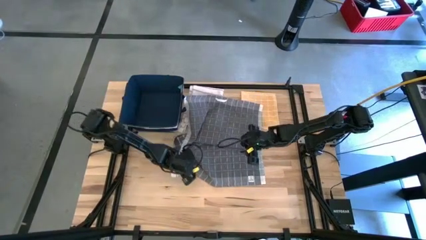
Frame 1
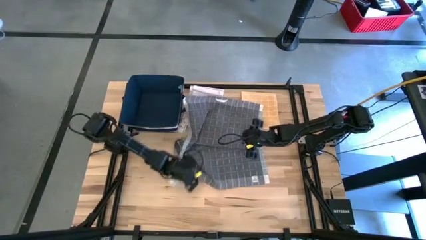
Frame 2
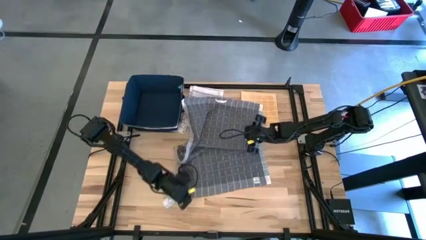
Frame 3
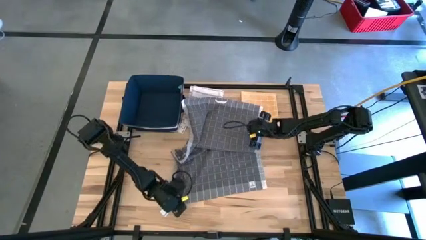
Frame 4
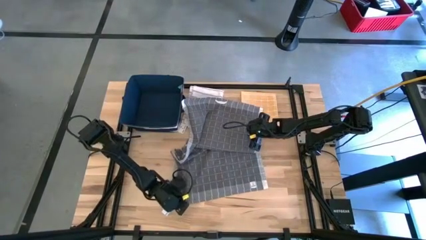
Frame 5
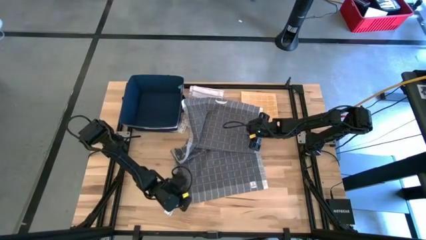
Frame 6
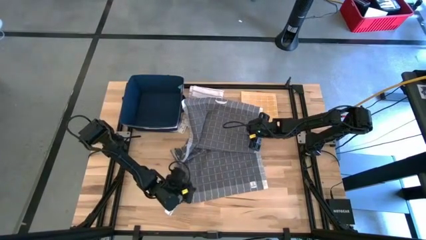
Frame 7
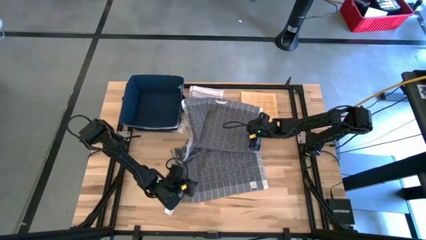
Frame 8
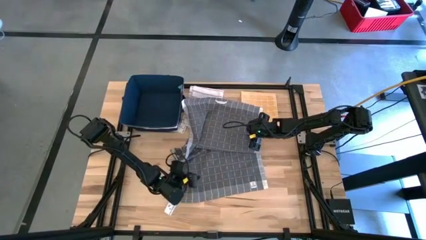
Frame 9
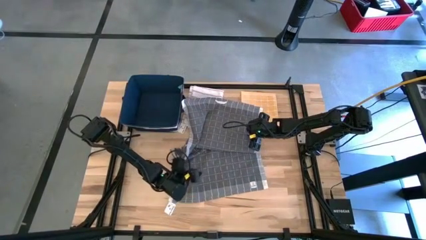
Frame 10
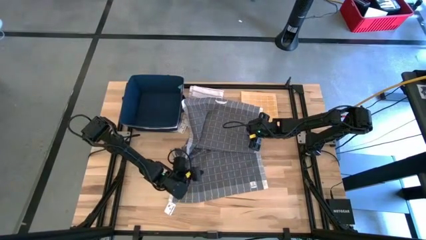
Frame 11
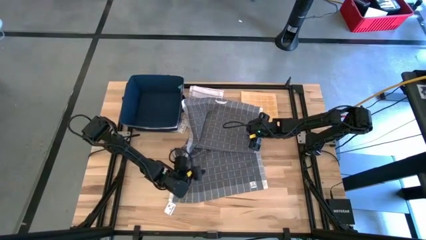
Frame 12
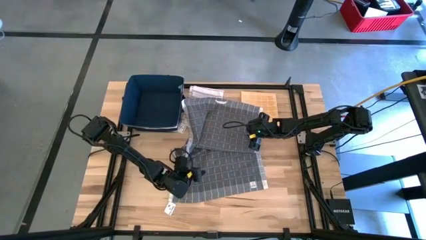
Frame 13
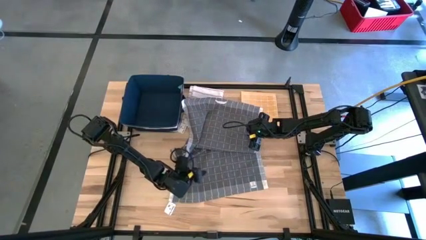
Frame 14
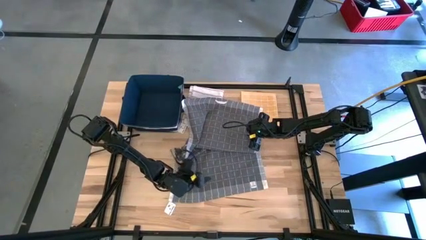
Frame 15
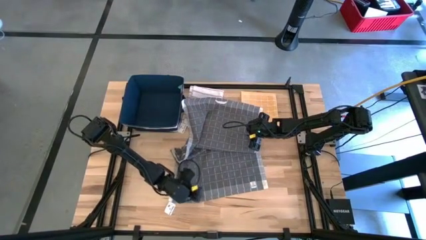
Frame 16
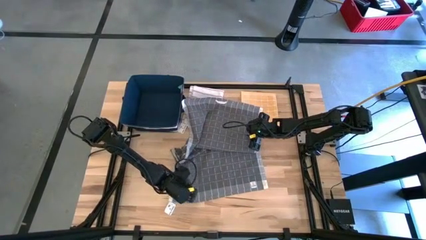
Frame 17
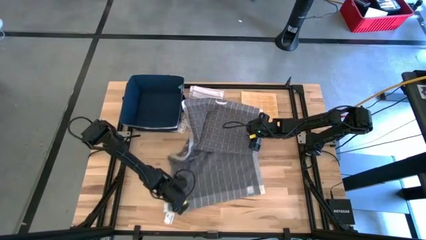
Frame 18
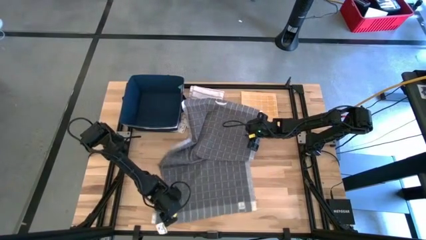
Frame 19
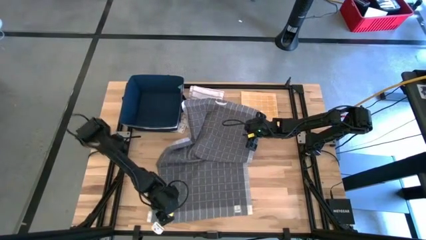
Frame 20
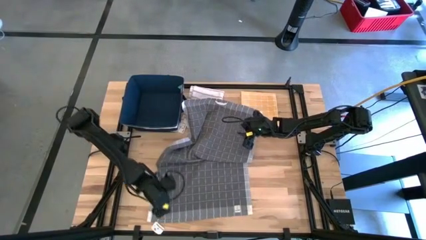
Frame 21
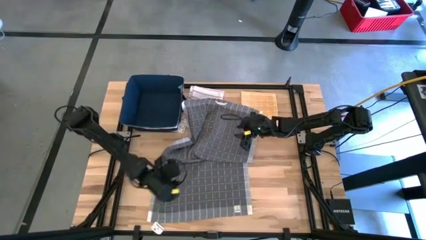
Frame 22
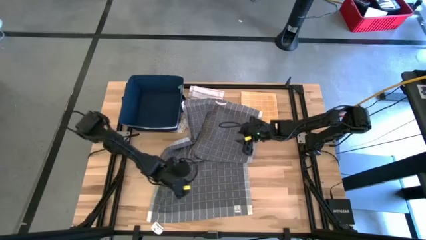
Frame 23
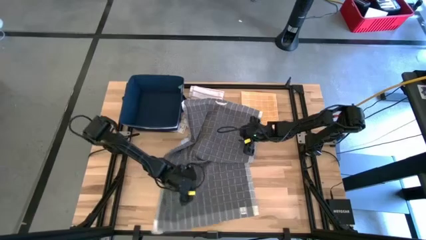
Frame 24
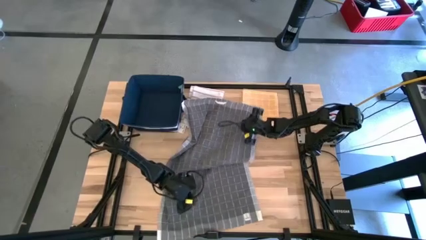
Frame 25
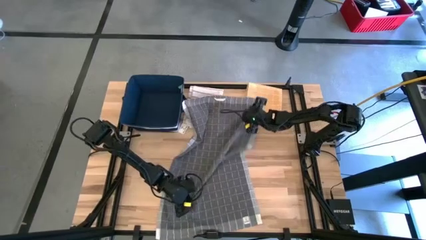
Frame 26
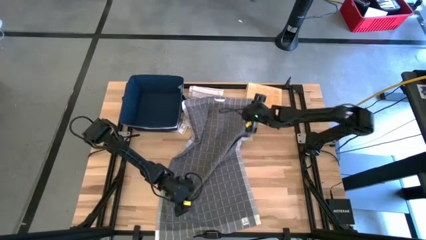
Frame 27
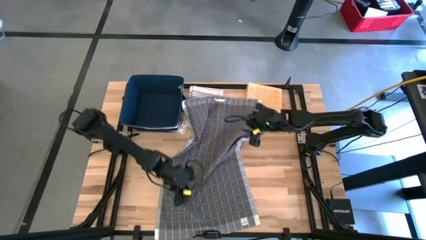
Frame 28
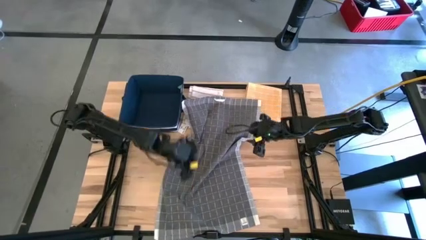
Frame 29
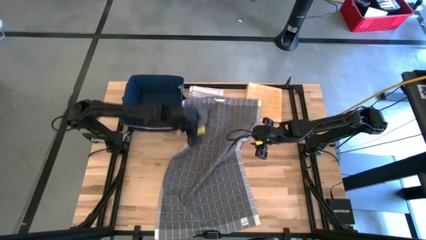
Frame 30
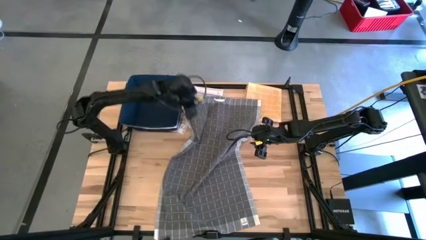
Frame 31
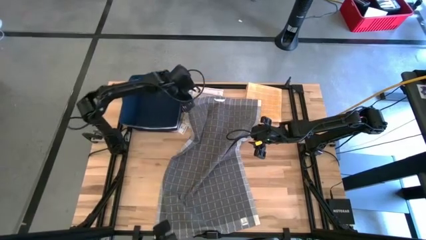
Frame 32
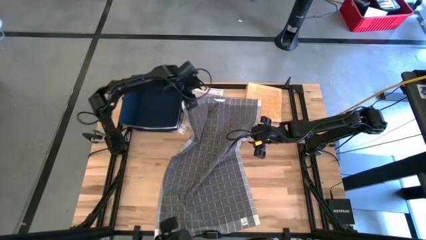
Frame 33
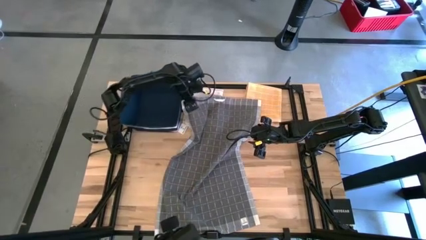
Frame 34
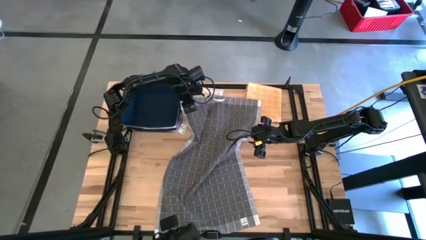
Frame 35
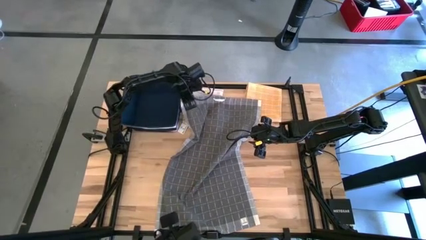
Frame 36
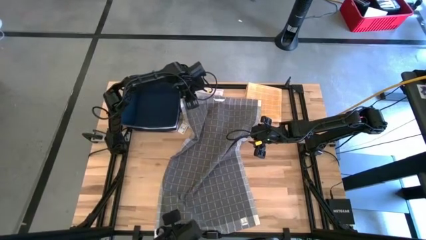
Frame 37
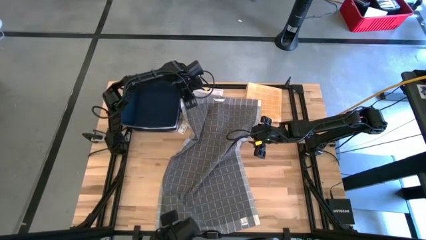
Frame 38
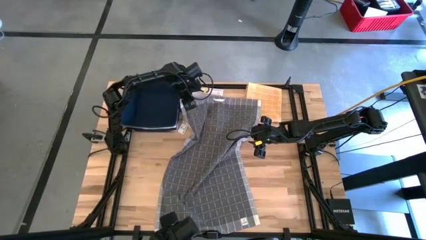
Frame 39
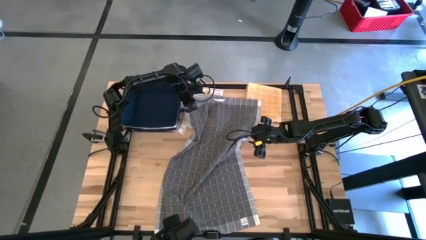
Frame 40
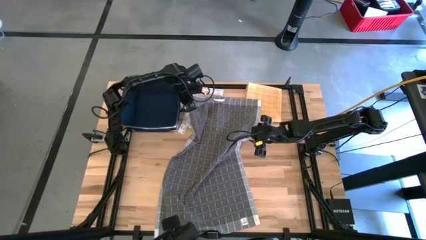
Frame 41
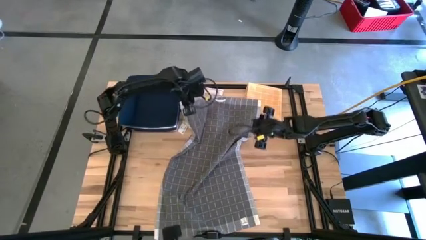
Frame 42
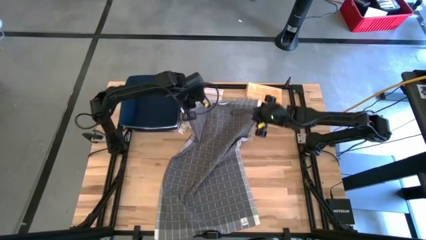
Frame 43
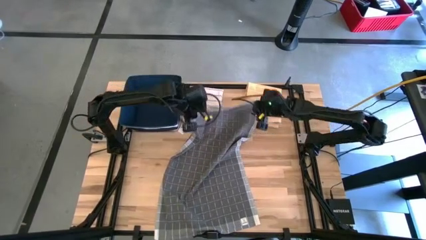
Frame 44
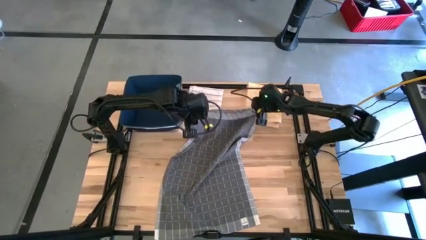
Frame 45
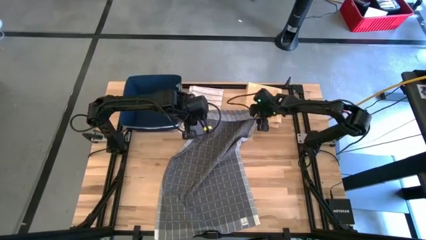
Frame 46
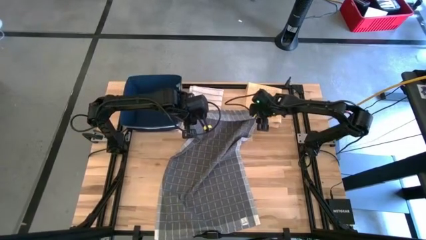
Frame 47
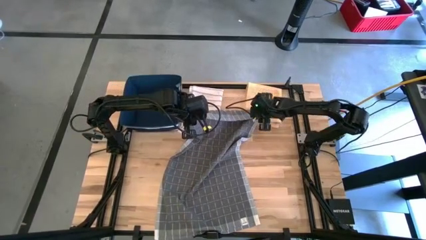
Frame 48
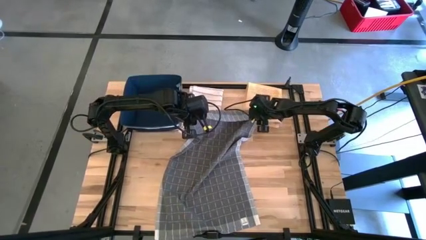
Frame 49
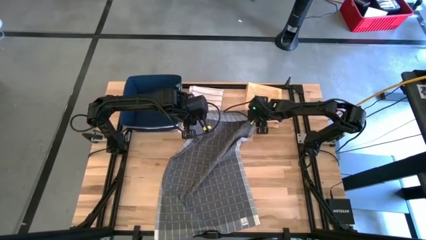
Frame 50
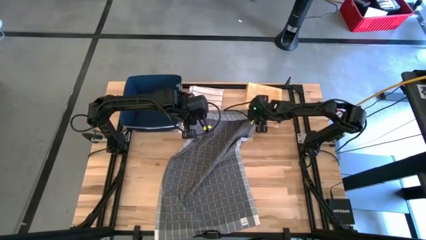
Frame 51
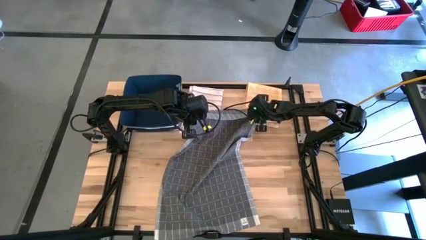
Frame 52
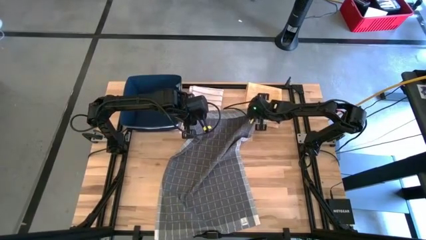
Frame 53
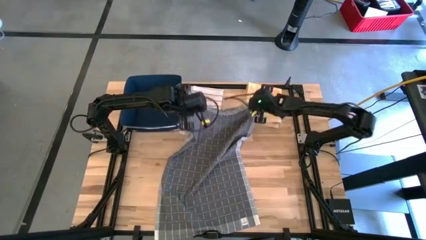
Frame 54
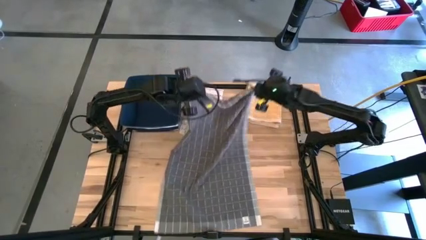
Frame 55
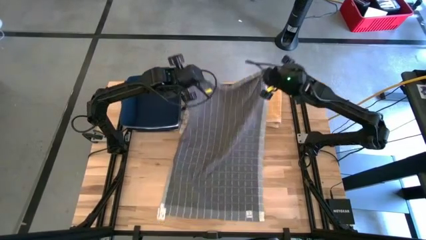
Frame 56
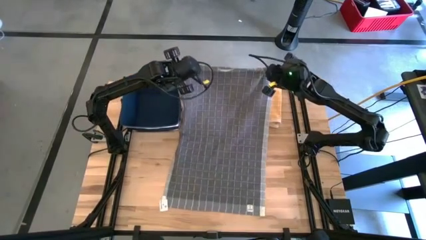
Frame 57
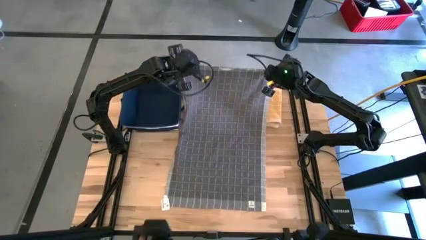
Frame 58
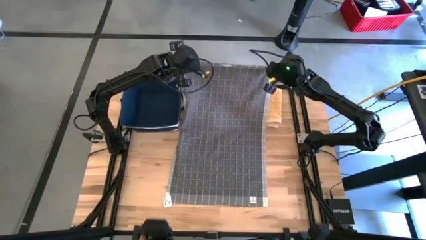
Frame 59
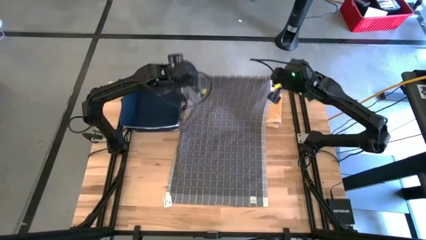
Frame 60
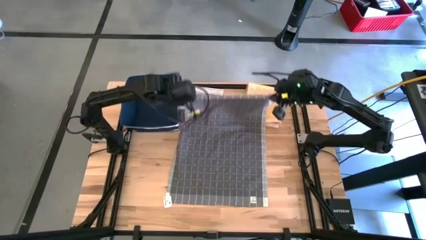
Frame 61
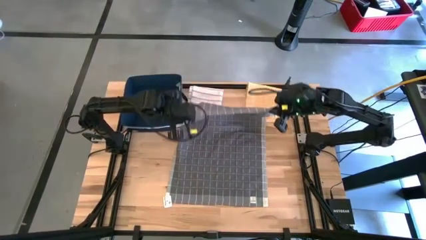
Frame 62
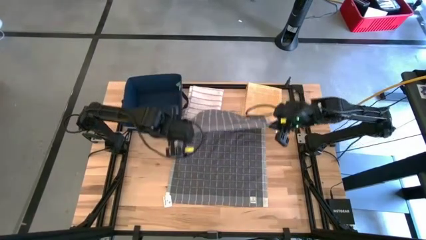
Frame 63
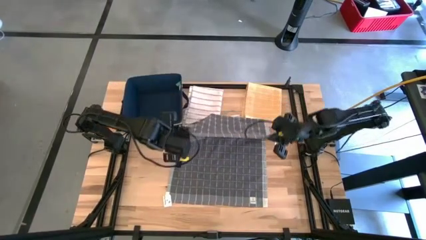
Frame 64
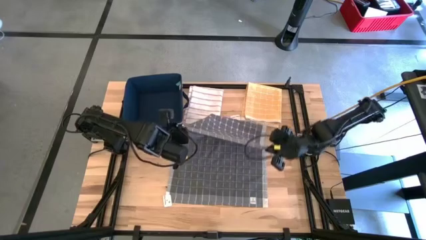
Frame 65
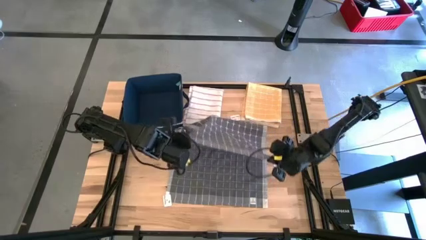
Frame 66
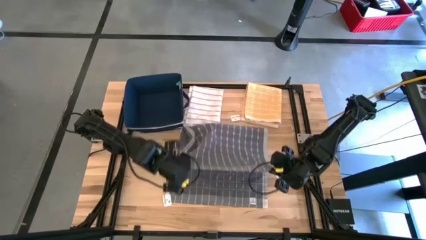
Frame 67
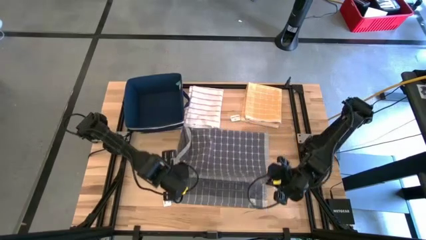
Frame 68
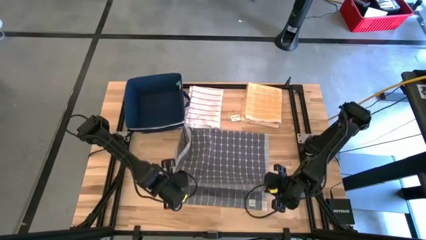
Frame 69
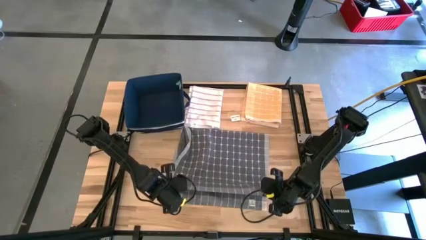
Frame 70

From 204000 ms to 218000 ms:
Task: Fold towel
Fold the gray towel

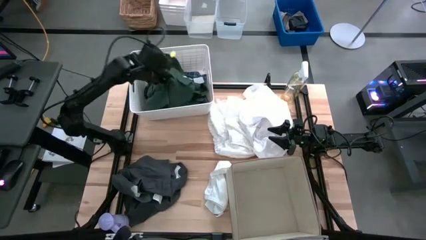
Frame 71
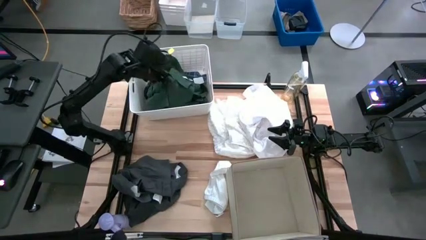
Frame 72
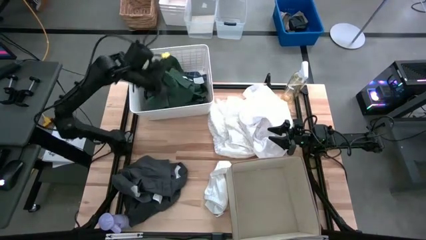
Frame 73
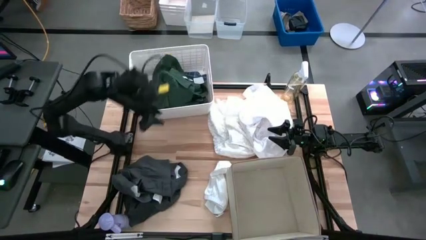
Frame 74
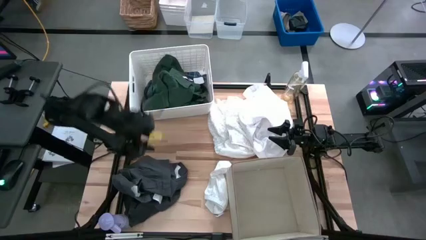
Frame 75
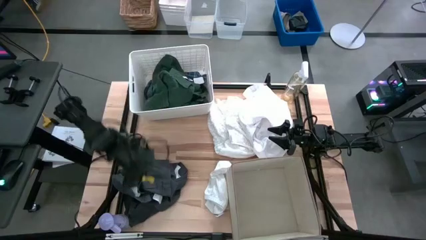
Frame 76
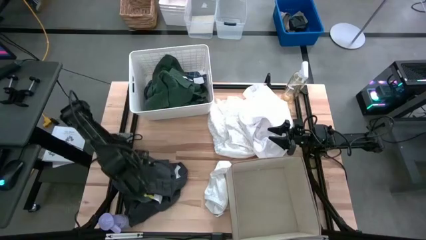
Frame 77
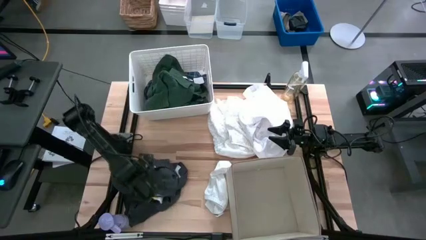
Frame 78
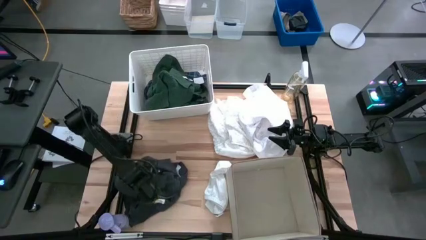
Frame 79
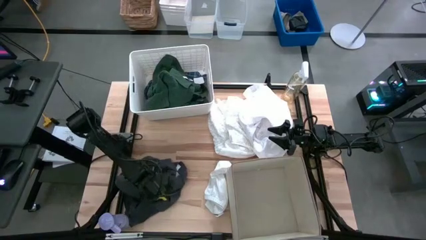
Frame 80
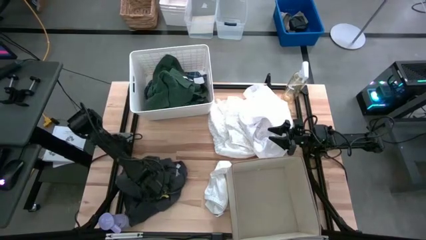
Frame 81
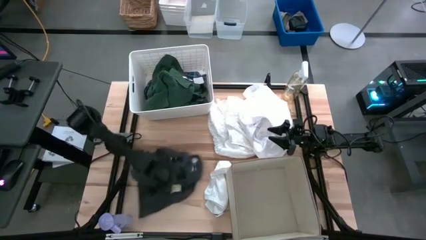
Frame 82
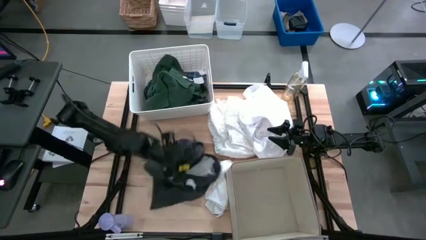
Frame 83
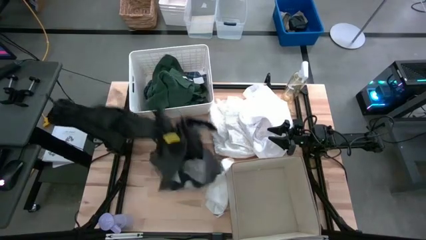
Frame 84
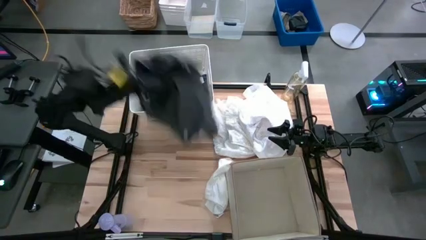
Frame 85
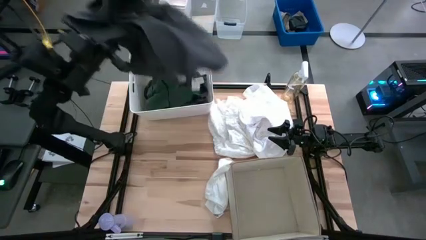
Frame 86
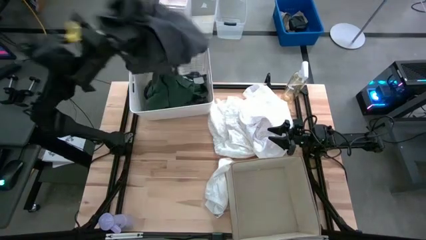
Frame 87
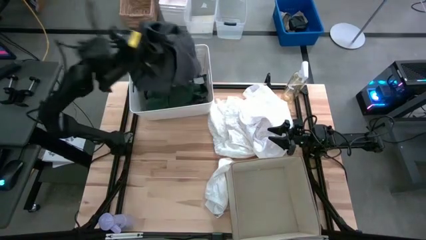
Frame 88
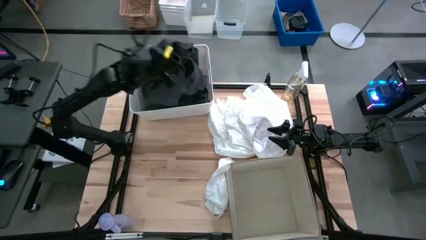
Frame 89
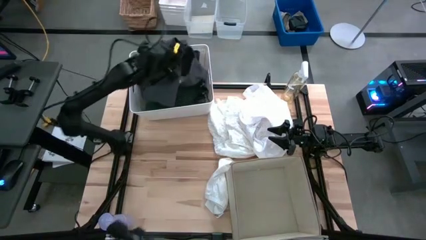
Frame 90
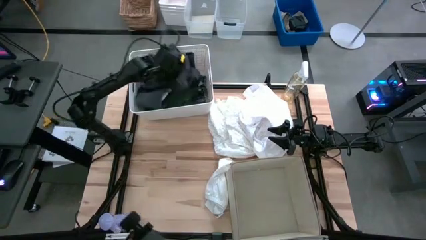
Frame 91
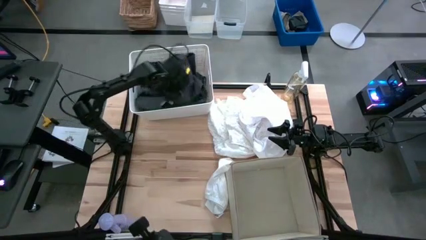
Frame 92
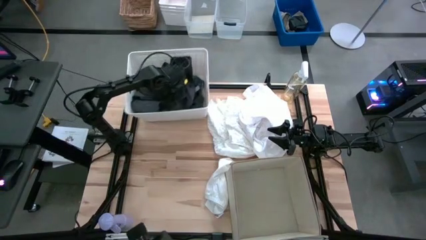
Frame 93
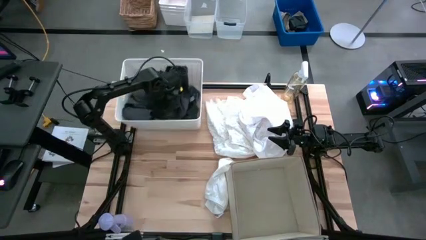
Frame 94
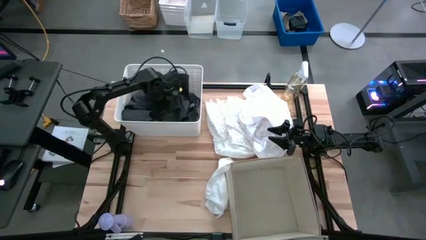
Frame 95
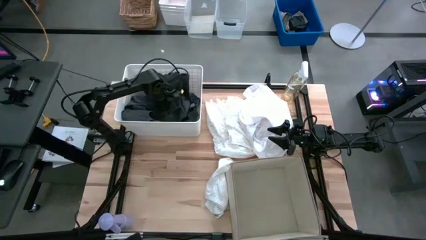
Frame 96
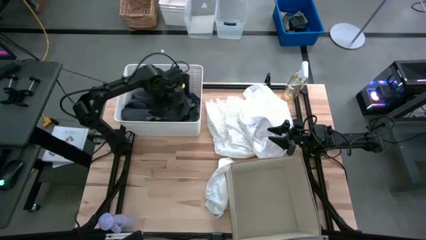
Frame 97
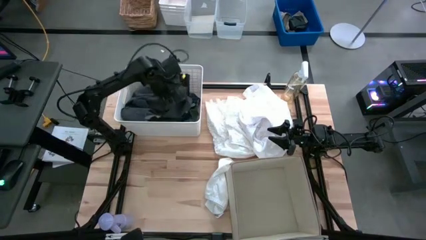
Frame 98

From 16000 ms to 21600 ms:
Task: Sort clothes
Put the black pants into the top white laundry organizer
